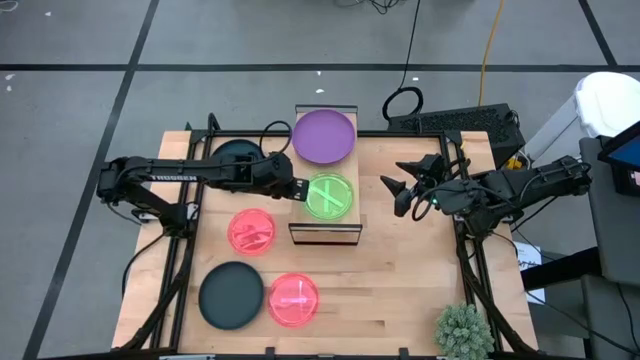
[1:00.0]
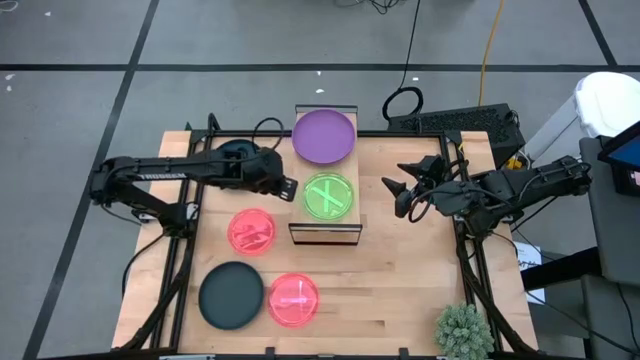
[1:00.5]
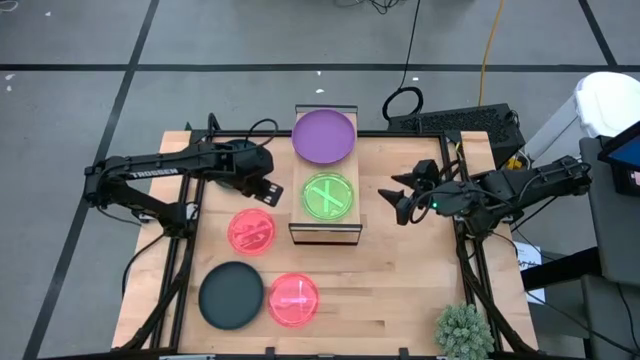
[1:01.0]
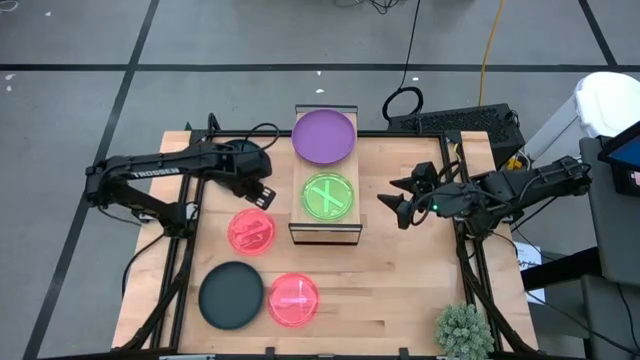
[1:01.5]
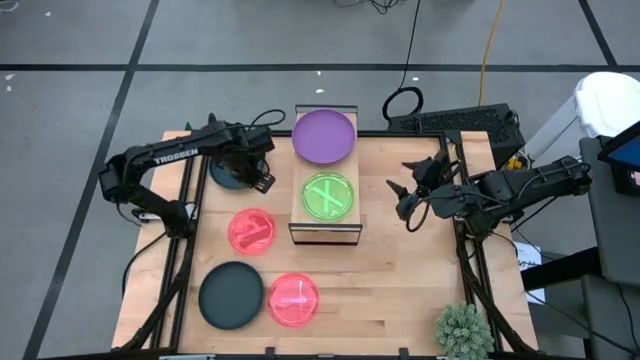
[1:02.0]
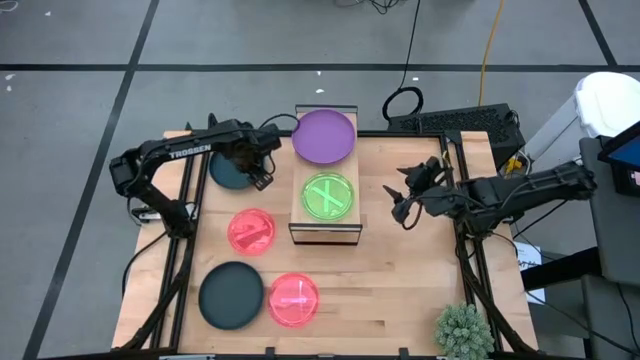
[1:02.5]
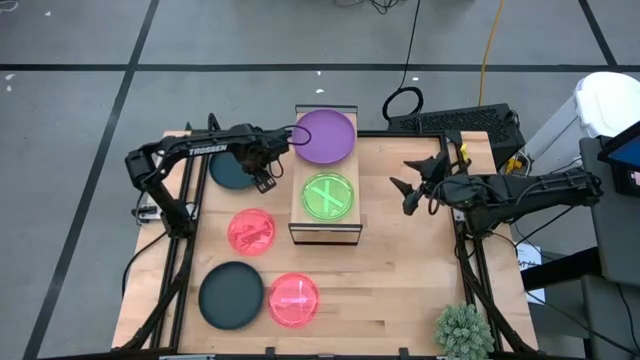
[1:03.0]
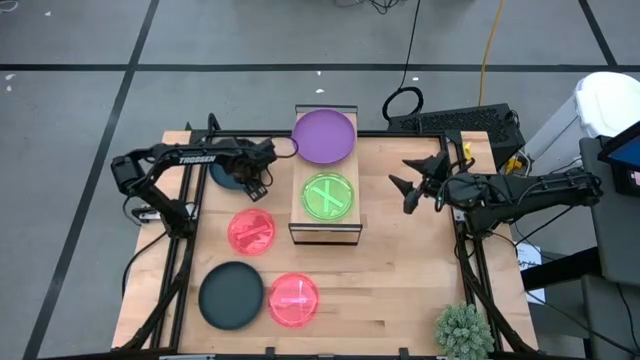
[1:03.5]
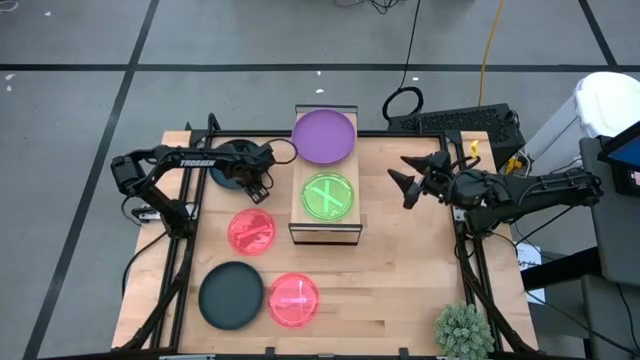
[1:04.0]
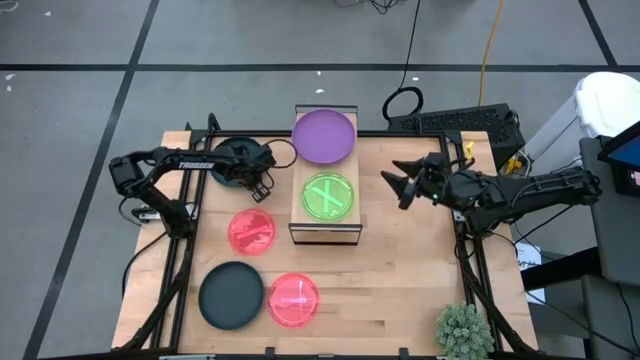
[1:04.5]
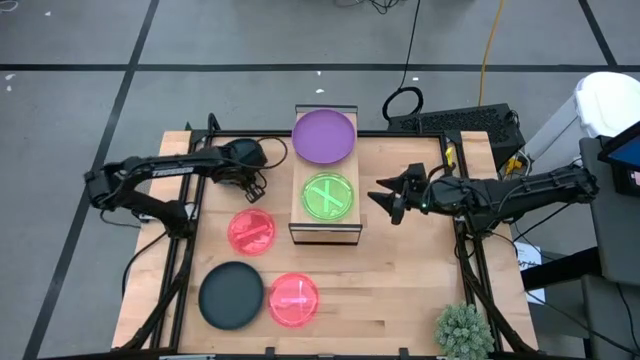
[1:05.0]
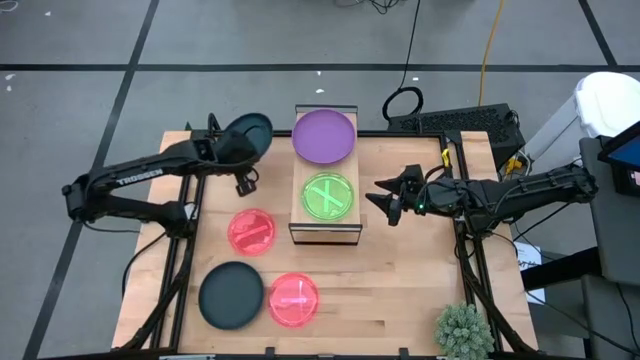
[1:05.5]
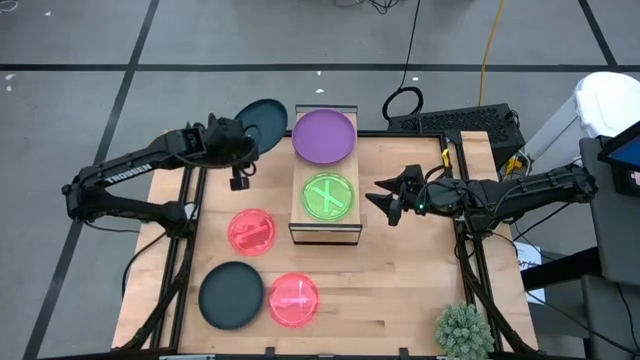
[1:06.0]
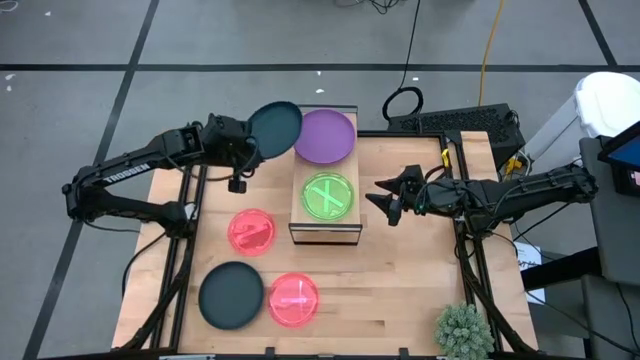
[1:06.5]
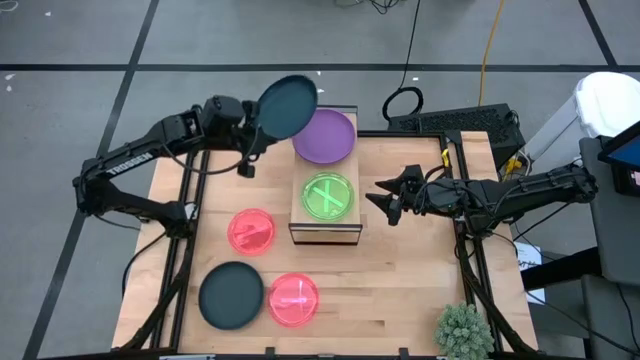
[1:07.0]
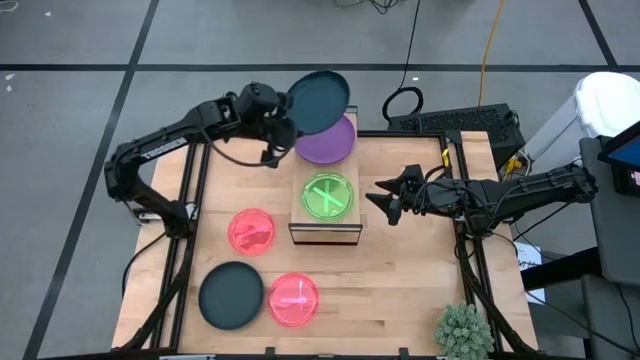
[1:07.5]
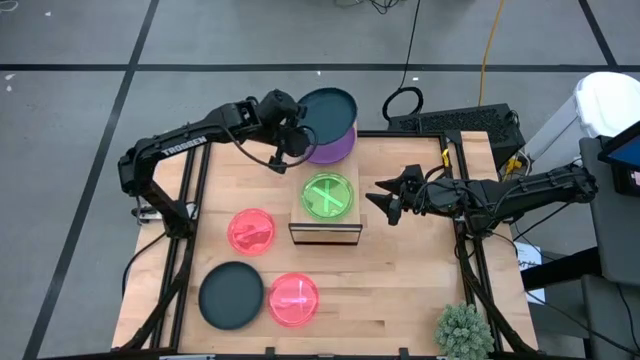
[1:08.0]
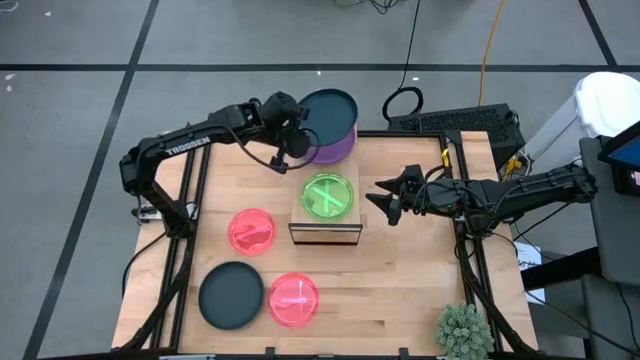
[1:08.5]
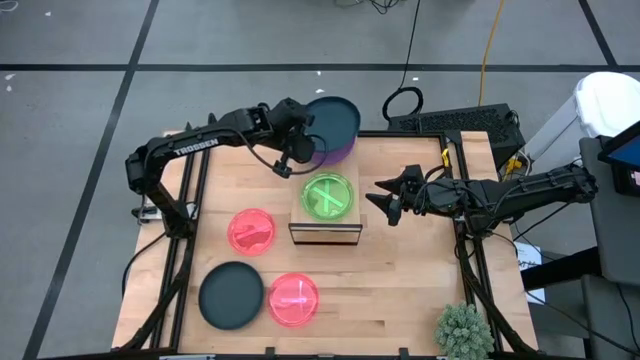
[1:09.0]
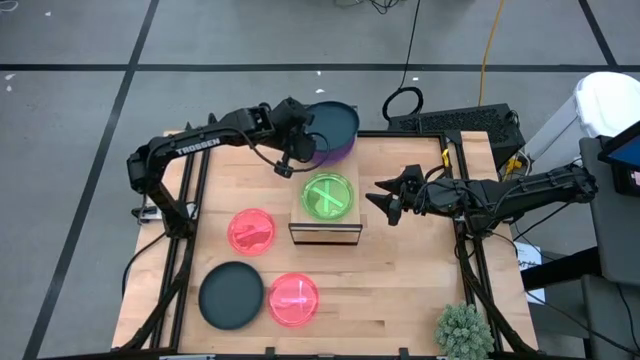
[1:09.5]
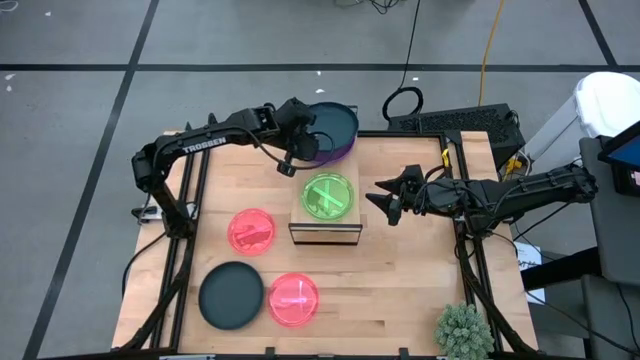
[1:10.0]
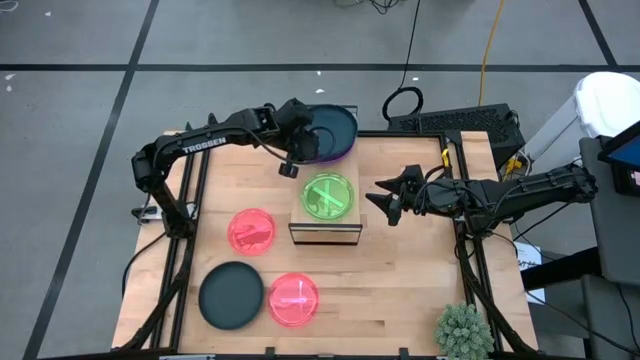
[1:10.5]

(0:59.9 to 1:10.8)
Task: Place and stack plates onto a shelf
Stack the top dark green plate on top of the purple plate on the shelf

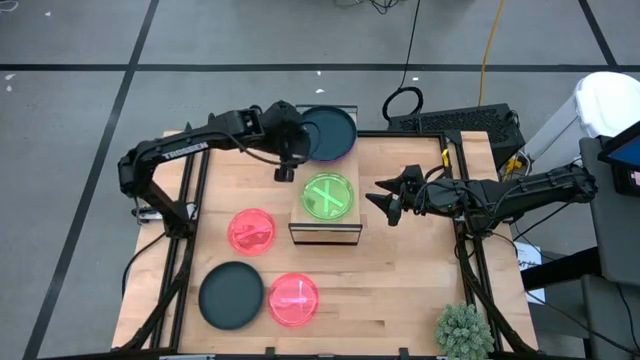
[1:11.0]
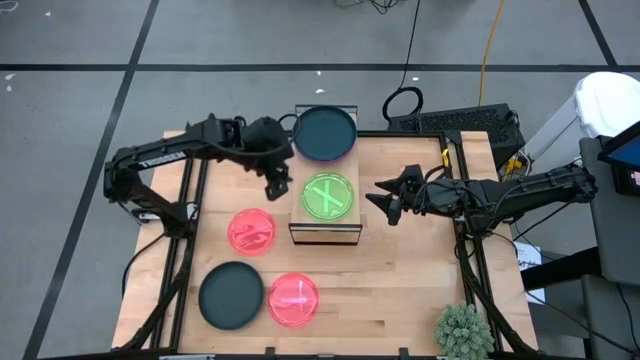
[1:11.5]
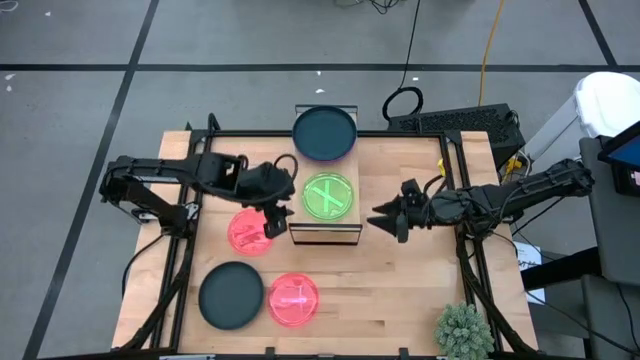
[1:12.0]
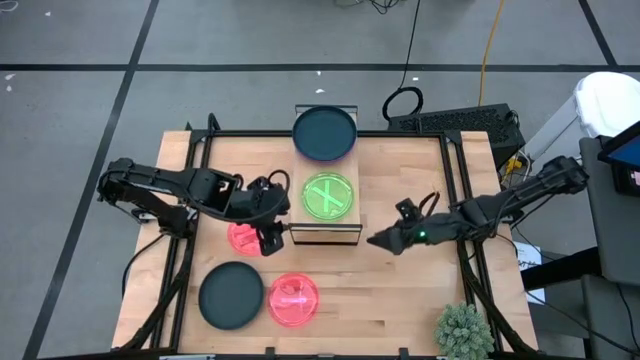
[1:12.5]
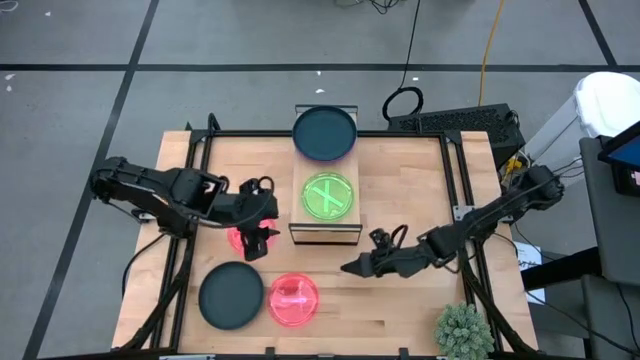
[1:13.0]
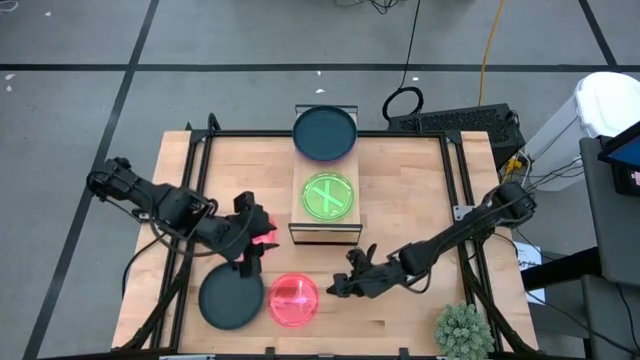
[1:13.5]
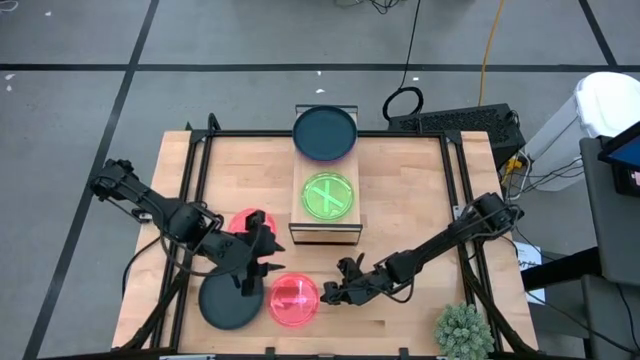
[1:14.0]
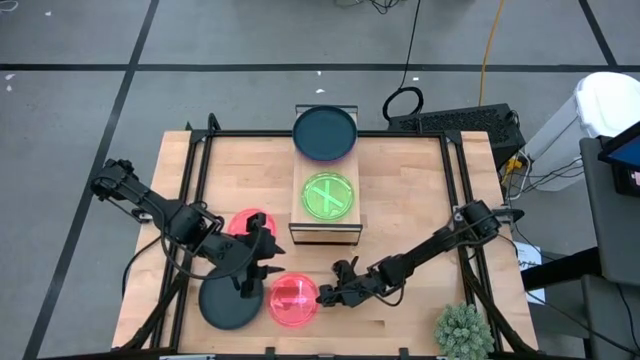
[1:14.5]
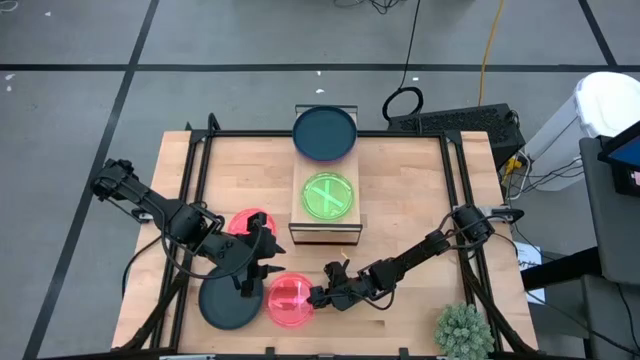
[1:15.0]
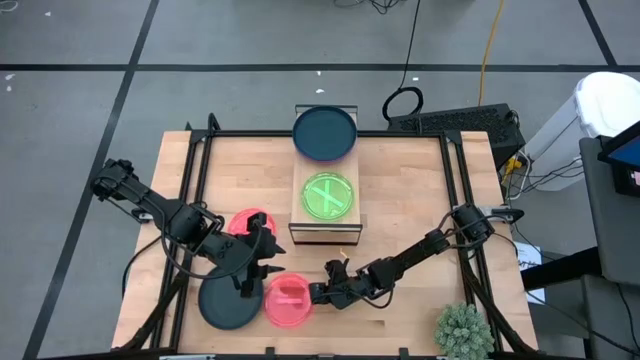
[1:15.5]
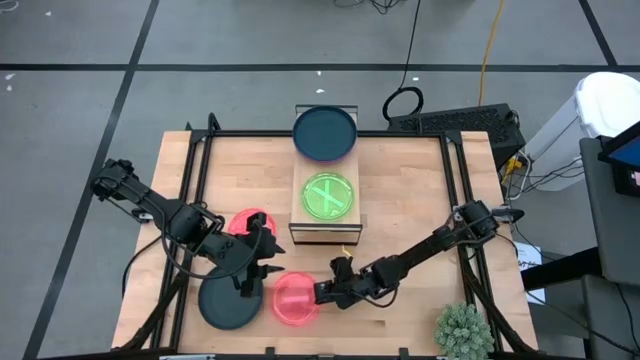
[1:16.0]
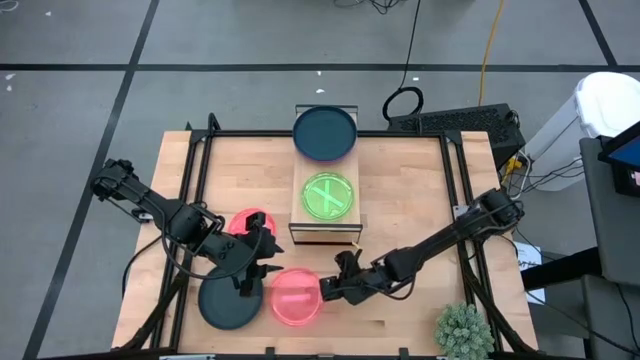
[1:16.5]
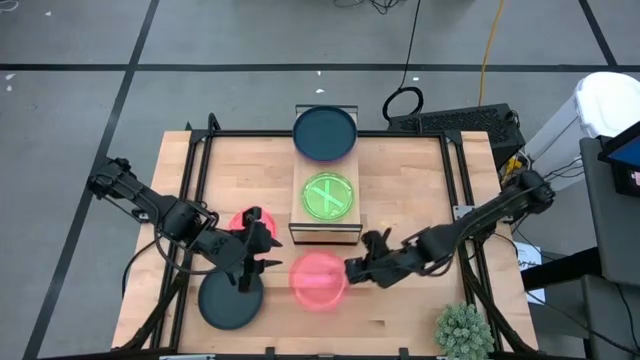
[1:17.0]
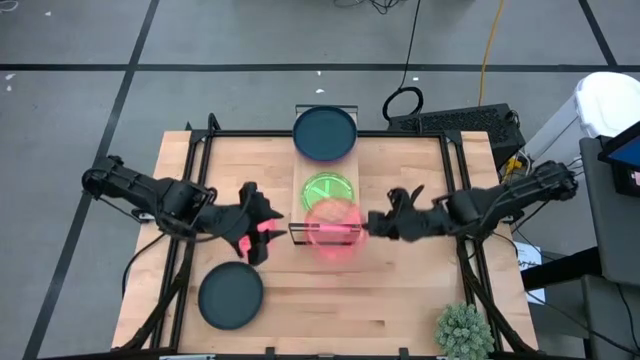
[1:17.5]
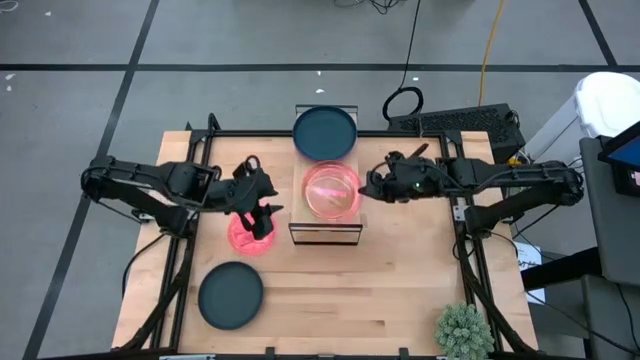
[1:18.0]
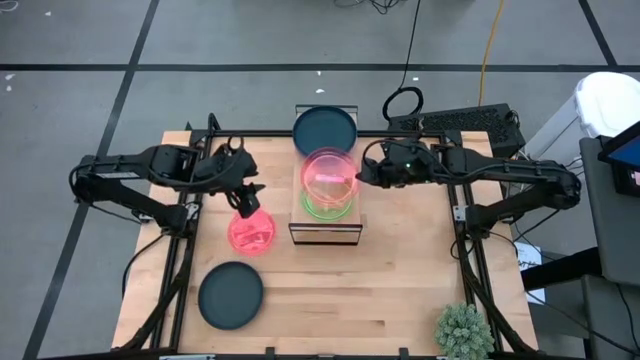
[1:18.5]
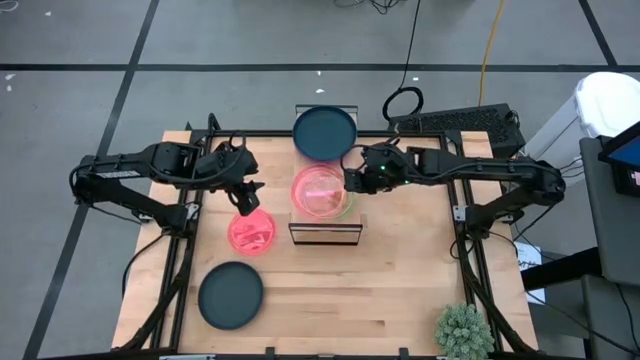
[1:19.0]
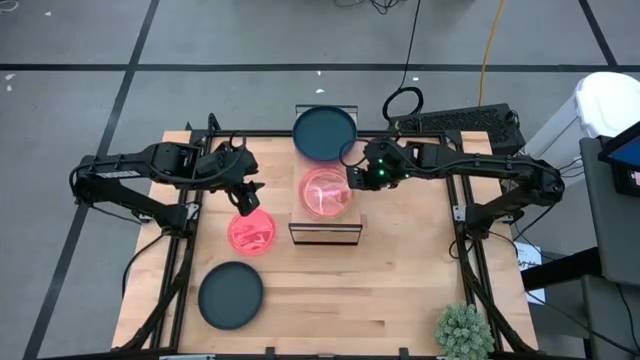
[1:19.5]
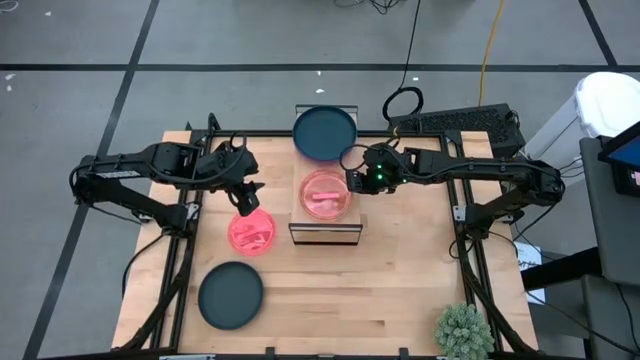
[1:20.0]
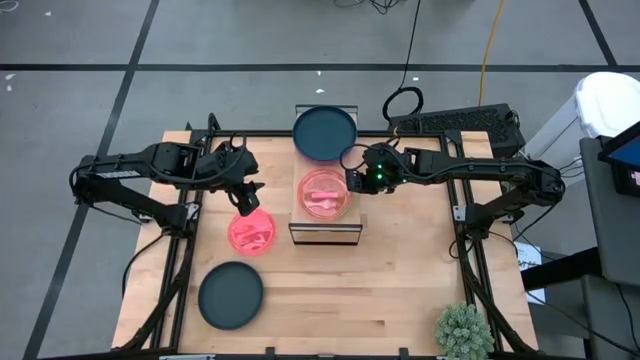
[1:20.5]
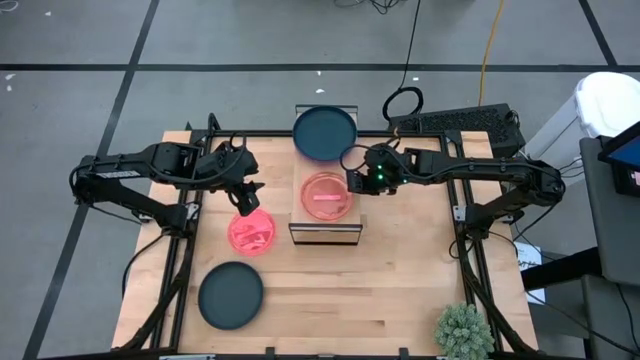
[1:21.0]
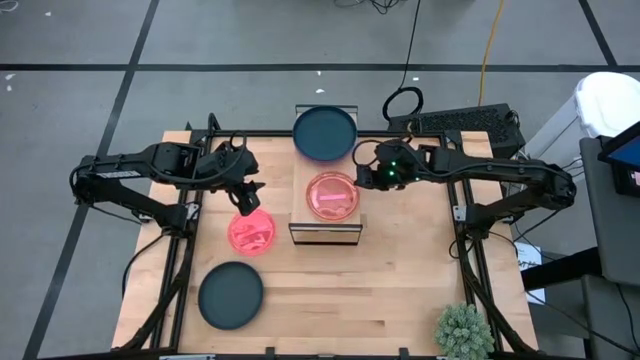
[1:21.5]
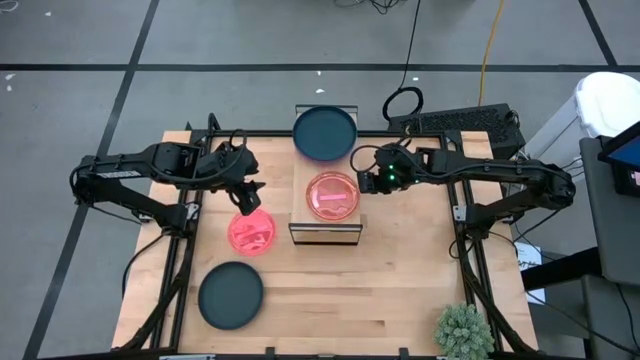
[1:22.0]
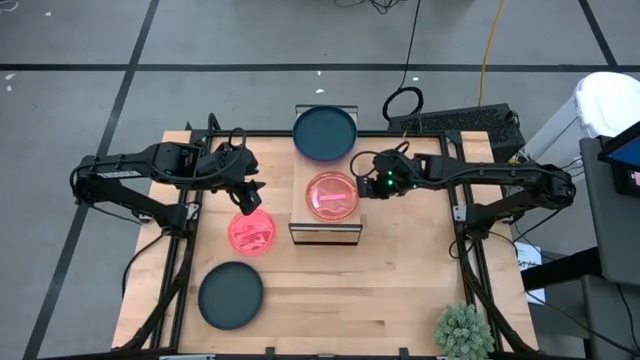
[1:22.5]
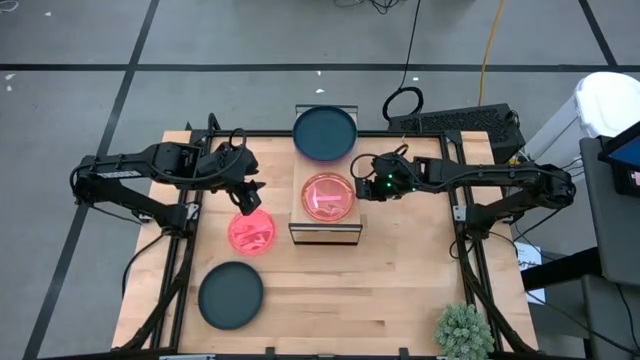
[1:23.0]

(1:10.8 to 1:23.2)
Stack the bottom pink plate on top of the green plate on the shelf
